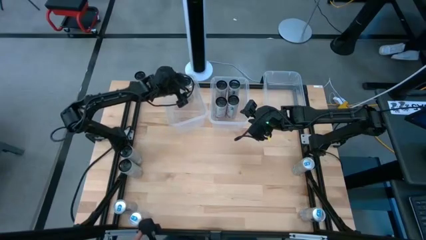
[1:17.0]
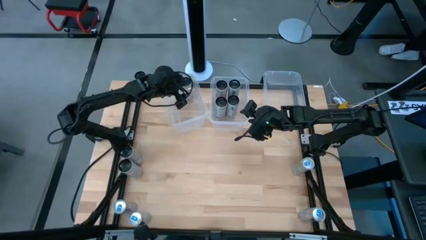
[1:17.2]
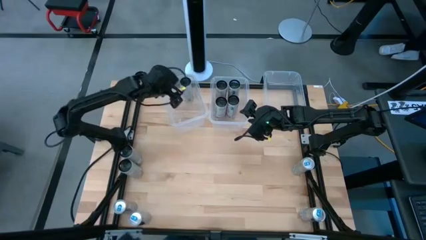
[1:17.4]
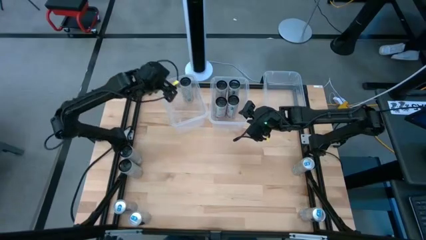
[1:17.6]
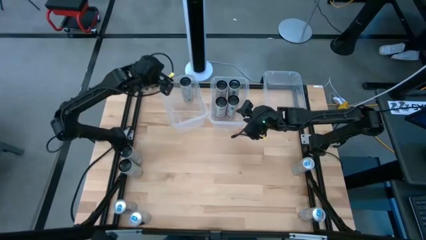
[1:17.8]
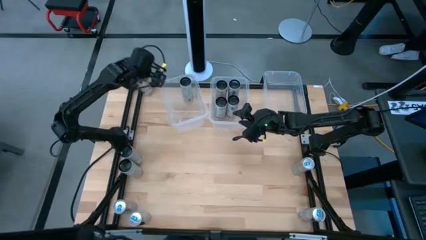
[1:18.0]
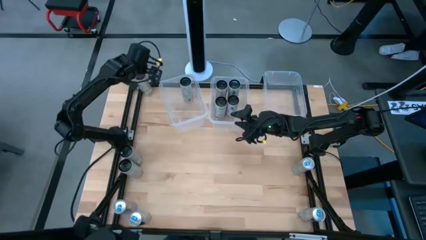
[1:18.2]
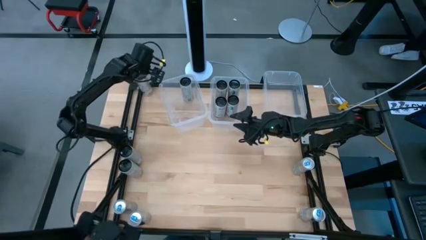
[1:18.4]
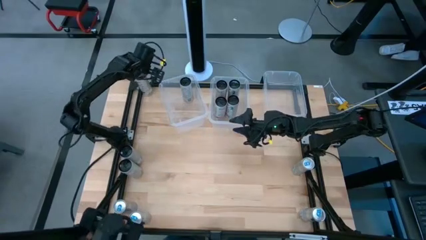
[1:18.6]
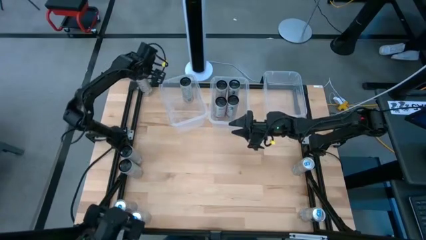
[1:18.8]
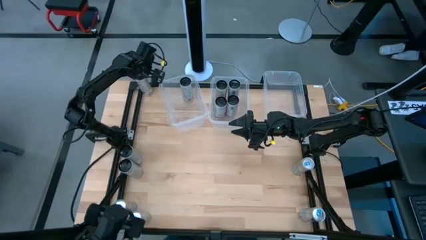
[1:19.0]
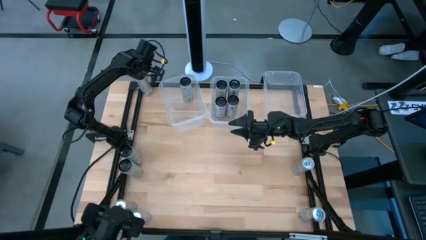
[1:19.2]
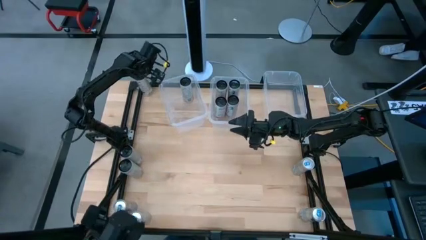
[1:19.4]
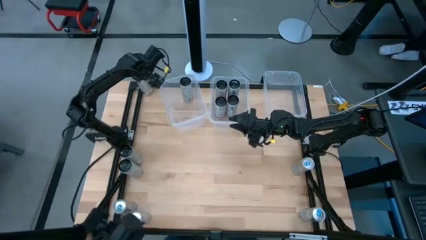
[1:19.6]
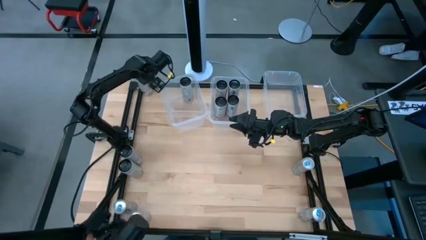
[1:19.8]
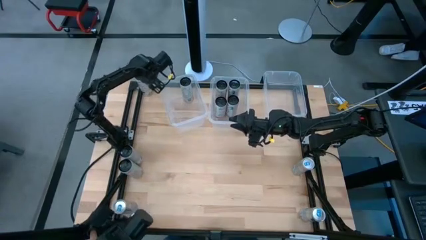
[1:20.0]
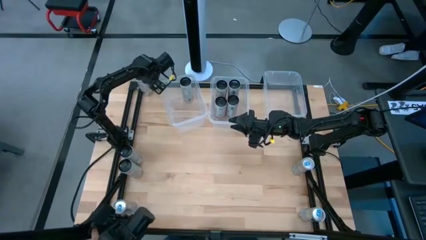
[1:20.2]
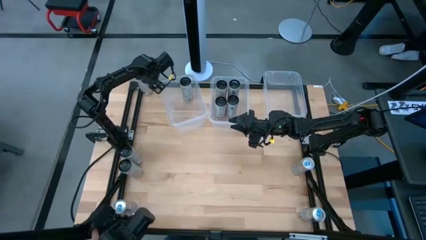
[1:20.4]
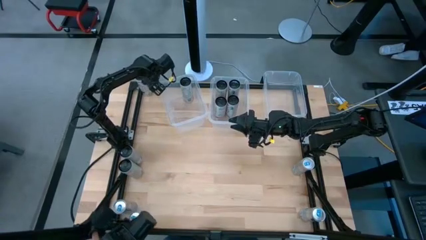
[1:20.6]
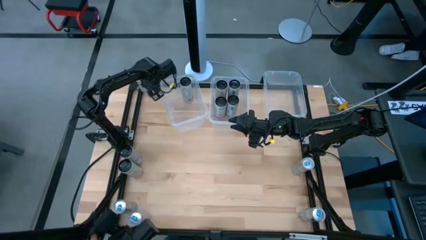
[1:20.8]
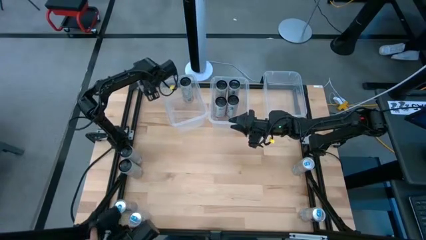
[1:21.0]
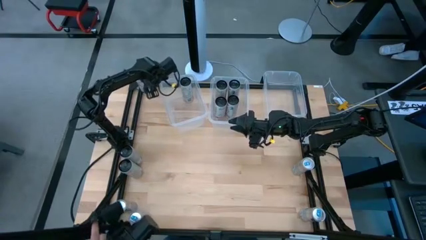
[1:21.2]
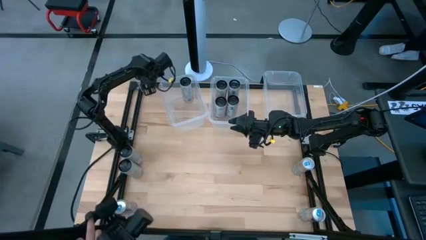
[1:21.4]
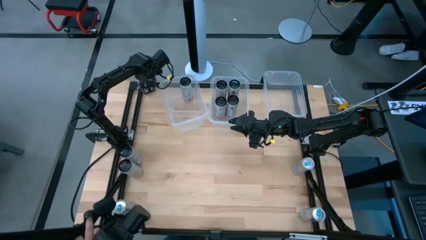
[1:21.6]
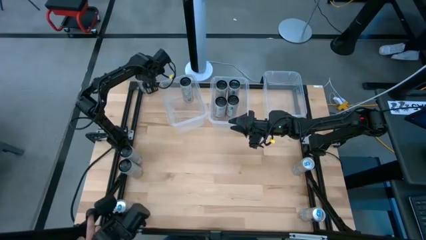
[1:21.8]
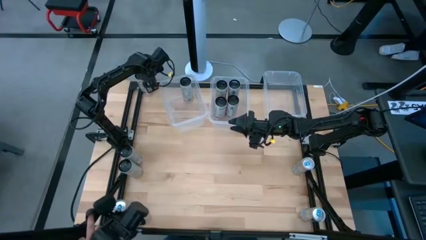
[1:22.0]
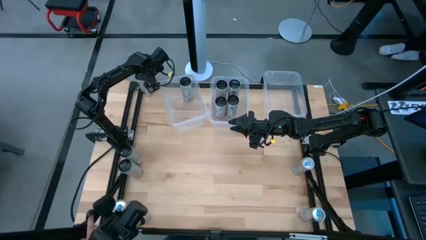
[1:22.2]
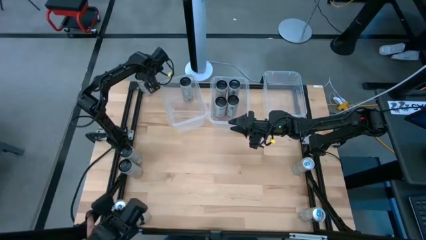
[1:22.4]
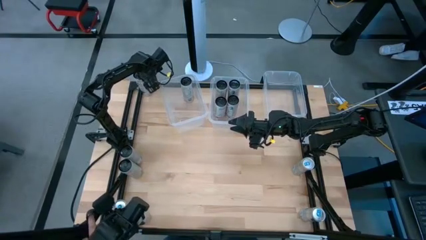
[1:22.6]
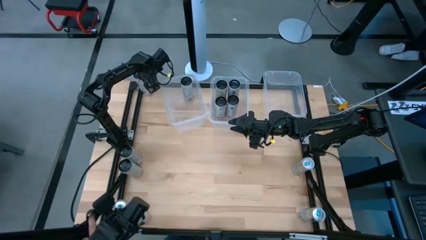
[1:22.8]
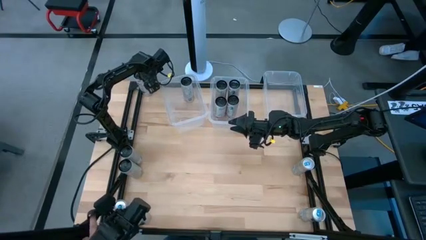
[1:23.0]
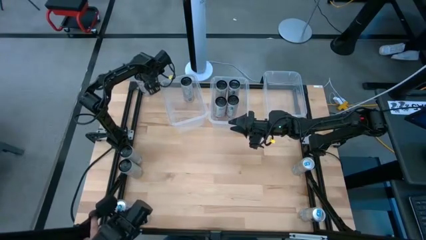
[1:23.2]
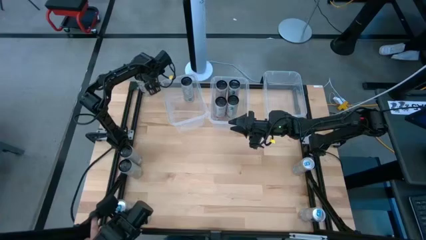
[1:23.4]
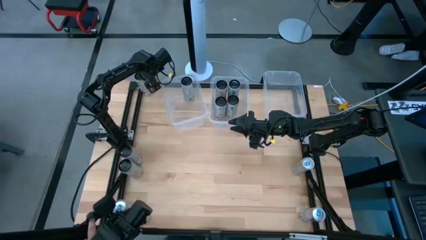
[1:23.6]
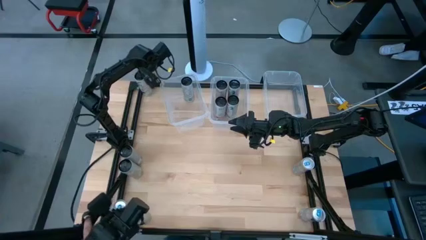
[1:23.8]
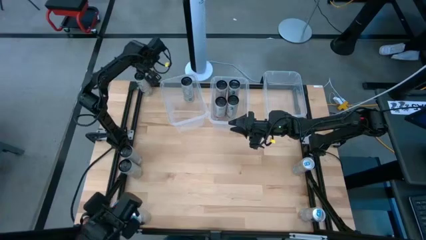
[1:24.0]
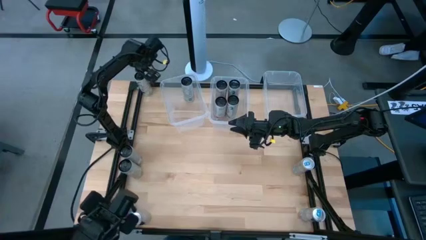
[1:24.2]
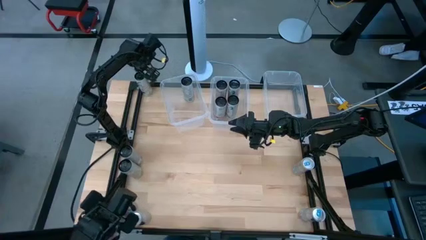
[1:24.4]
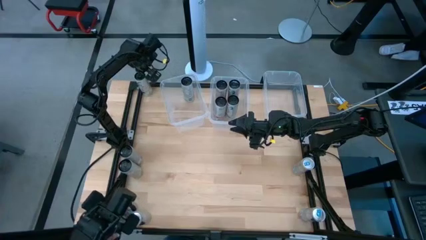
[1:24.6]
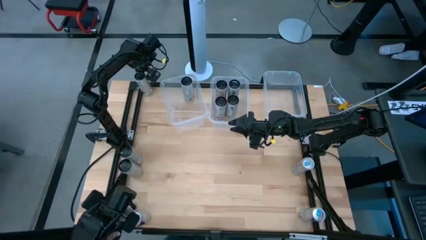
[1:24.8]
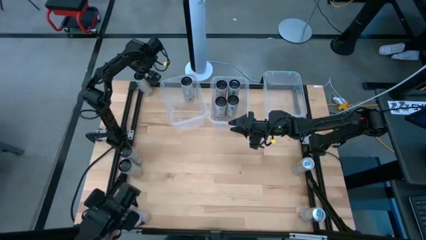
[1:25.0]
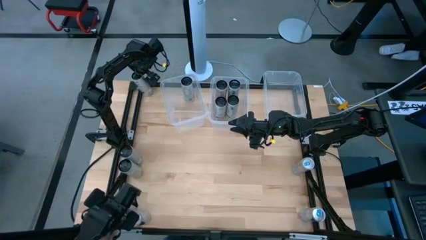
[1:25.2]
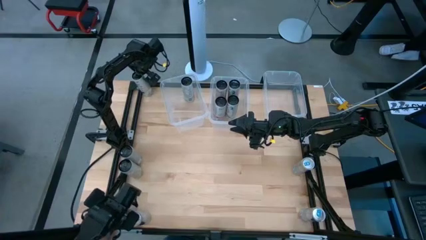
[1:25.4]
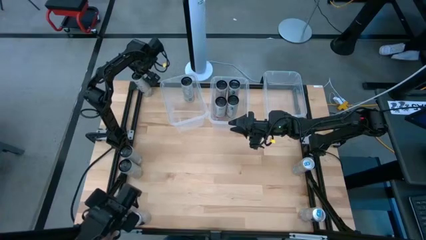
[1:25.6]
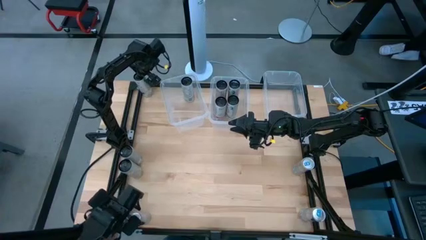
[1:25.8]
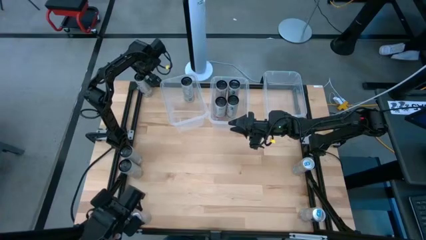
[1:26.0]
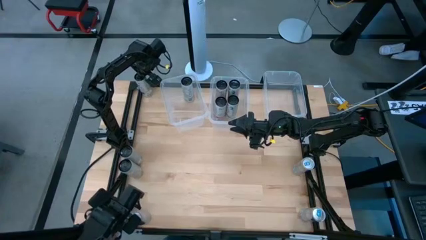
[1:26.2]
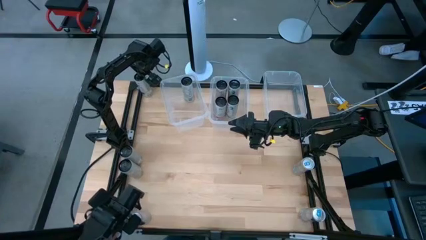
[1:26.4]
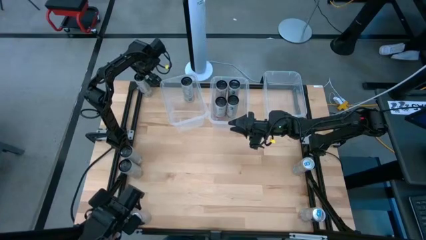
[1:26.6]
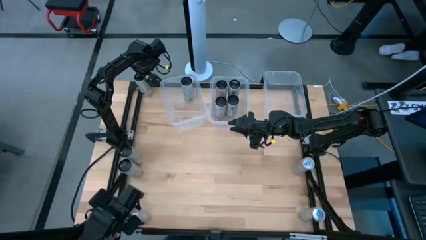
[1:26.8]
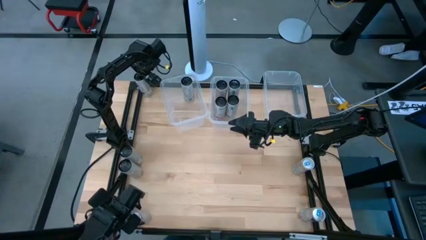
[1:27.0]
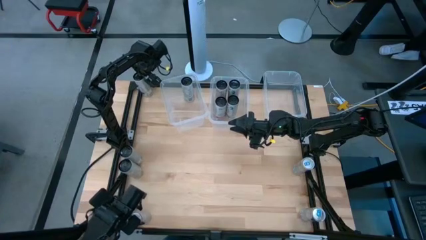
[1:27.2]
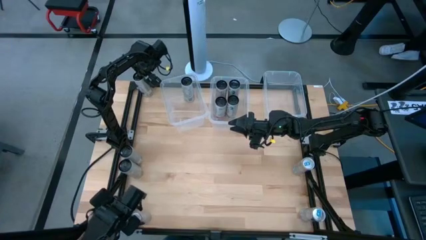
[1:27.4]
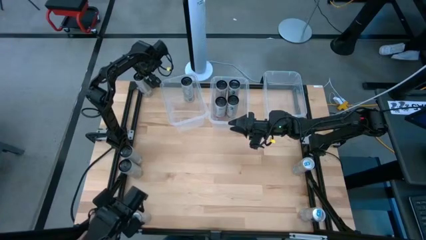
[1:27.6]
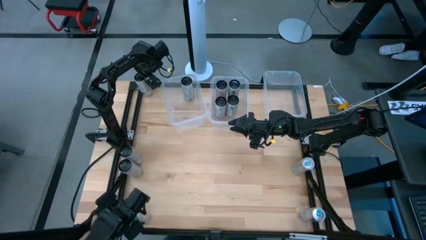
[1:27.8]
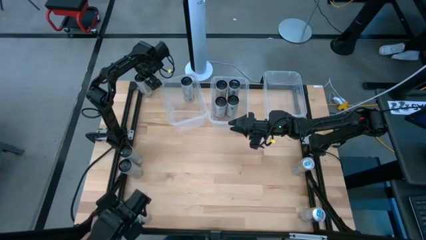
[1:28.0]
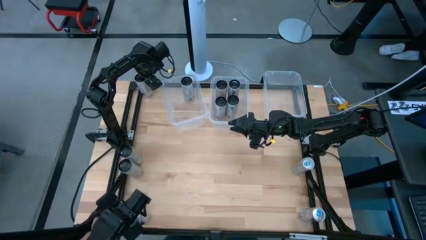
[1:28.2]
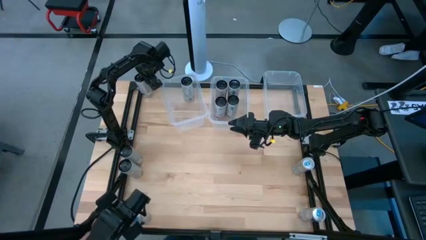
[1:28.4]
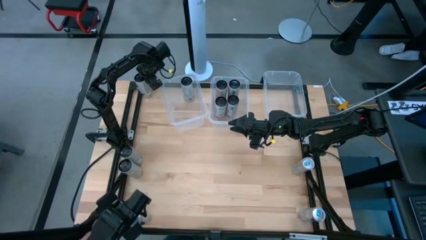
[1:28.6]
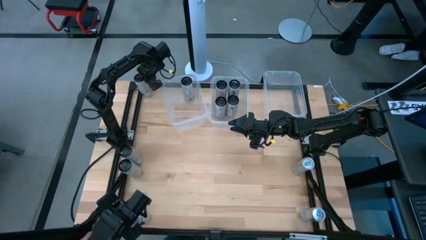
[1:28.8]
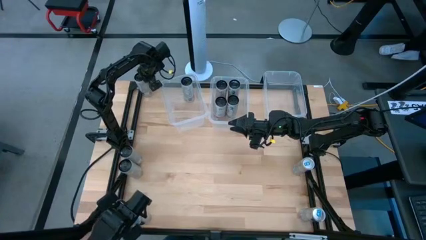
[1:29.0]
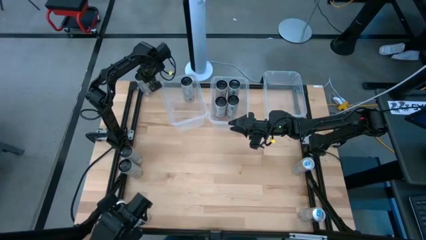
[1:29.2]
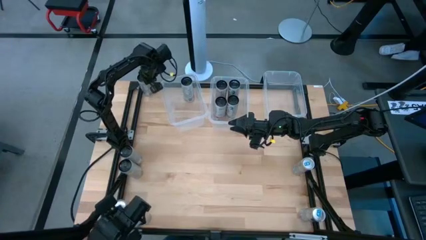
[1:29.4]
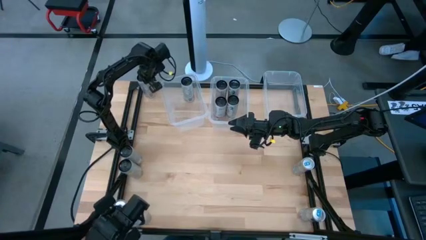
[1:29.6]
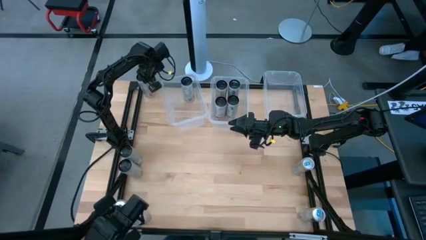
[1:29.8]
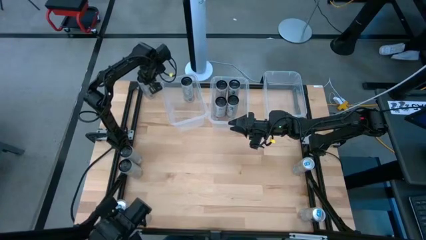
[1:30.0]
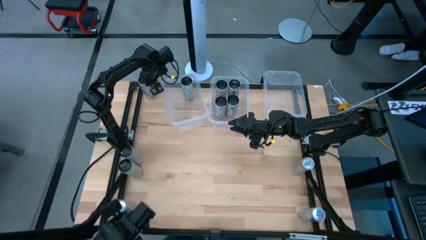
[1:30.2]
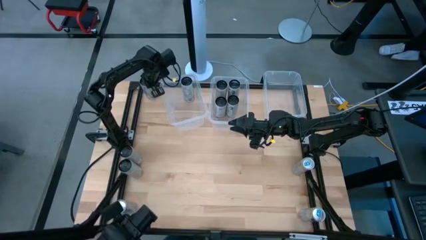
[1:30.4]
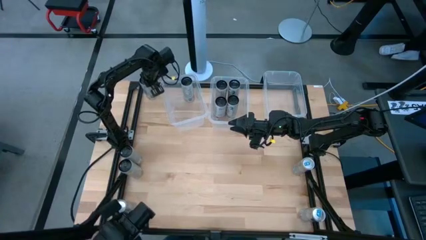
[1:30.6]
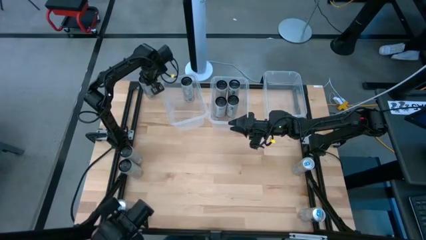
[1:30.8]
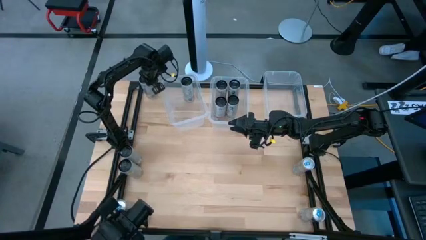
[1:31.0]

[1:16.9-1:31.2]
Task: Sort soda cans
Put the top white and black starfruit soda can into the left transparent bin

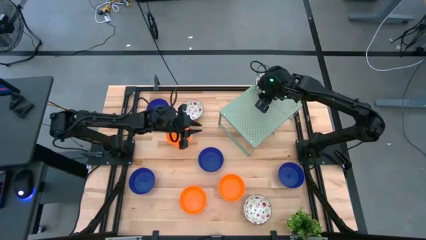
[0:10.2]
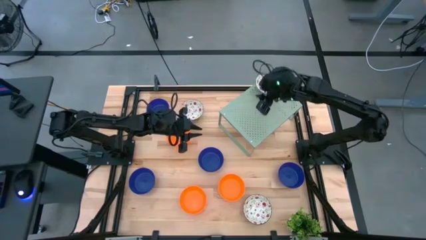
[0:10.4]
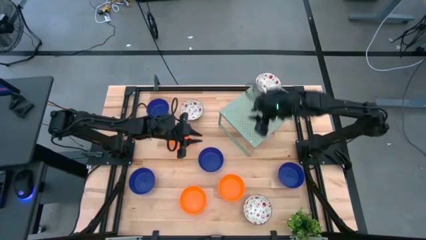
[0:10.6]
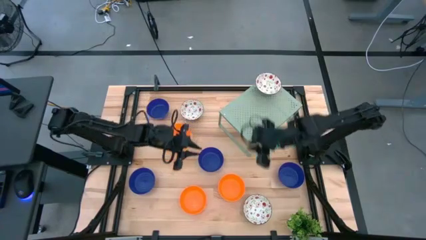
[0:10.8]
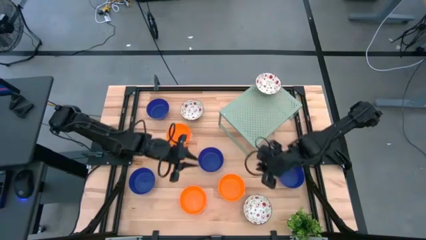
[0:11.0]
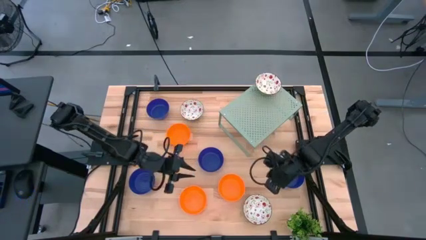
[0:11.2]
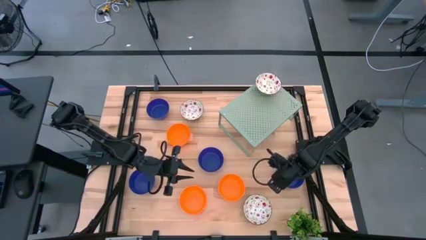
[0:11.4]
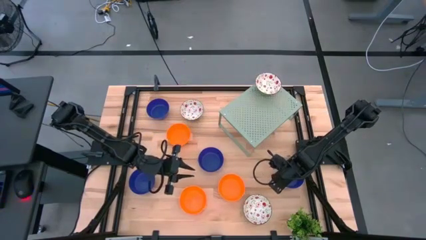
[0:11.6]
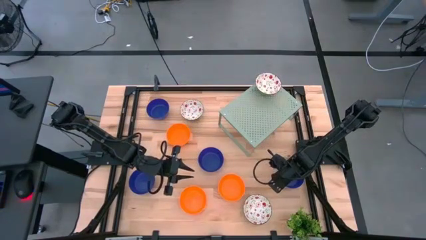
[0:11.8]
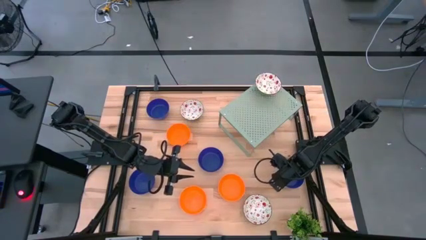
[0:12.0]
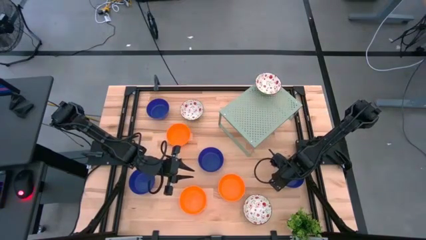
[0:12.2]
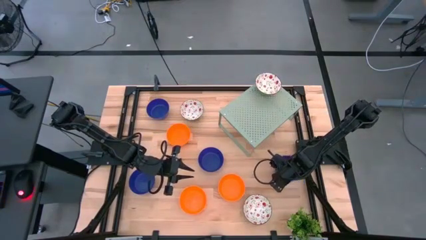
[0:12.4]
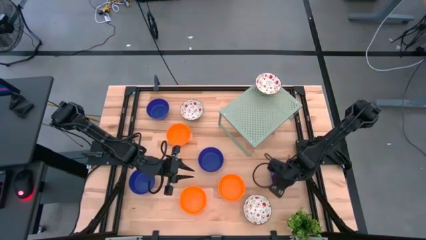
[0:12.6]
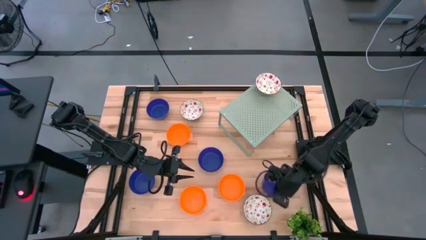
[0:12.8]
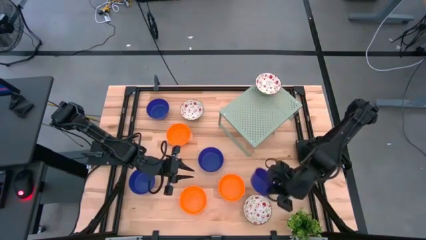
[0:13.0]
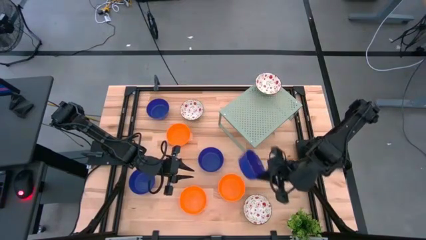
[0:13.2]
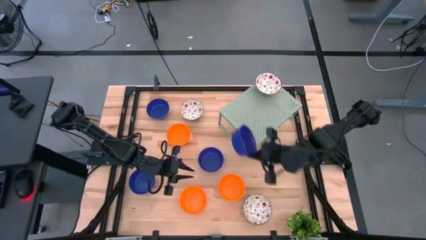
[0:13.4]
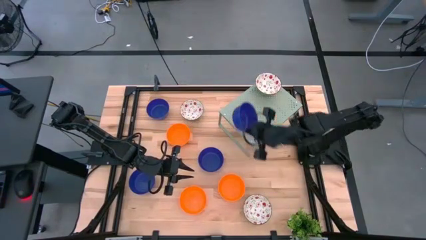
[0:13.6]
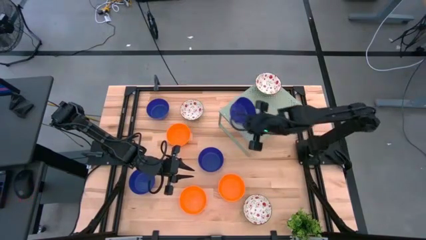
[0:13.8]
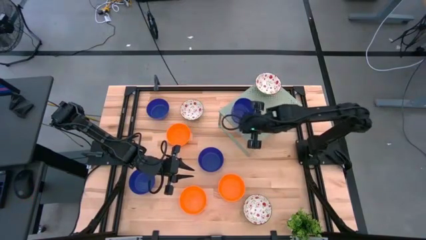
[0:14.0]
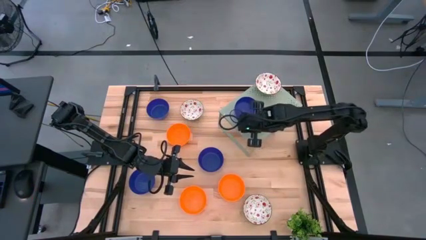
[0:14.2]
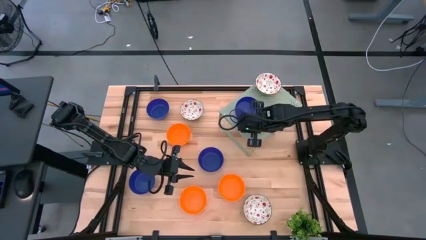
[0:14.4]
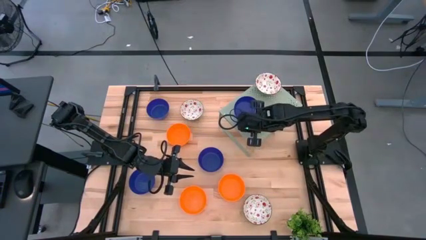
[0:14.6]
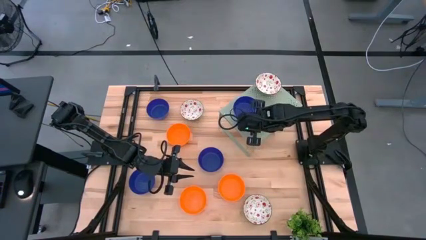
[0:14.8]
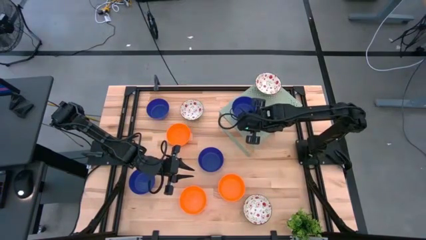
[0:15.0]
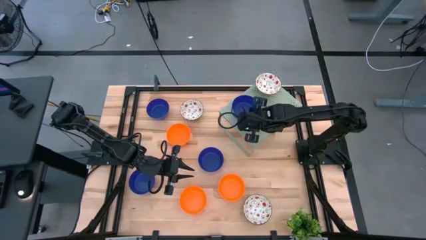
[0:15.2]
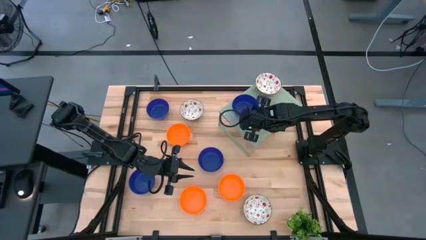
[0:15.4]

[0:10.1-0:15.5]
Task: Pick & Place Mini bowls
Put the blue bowl on the shelf
